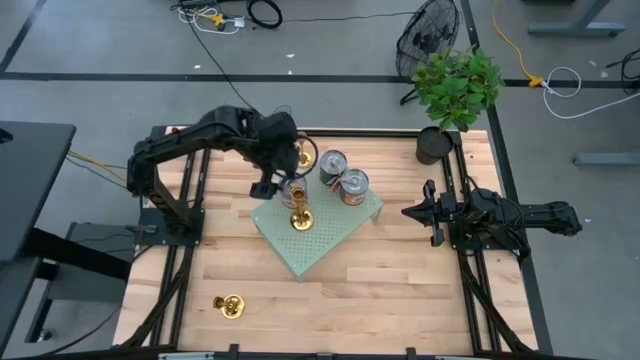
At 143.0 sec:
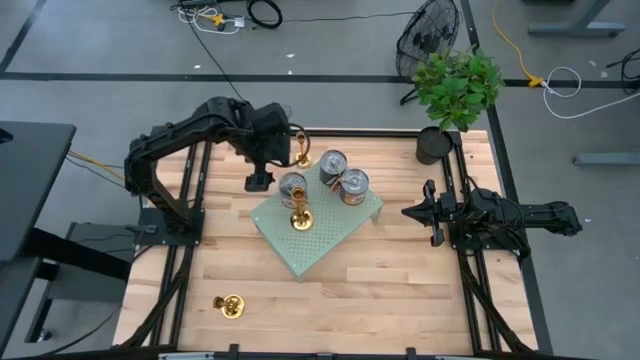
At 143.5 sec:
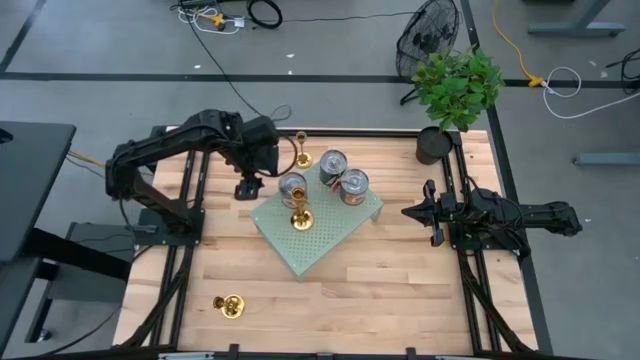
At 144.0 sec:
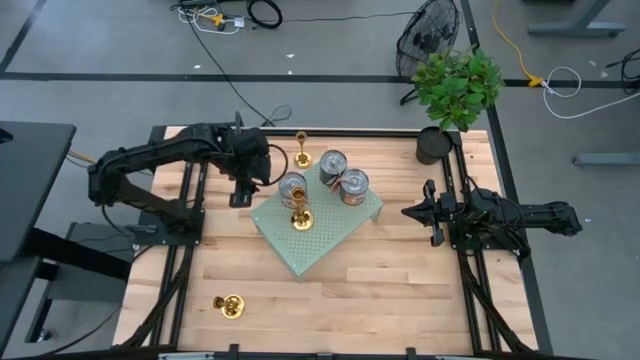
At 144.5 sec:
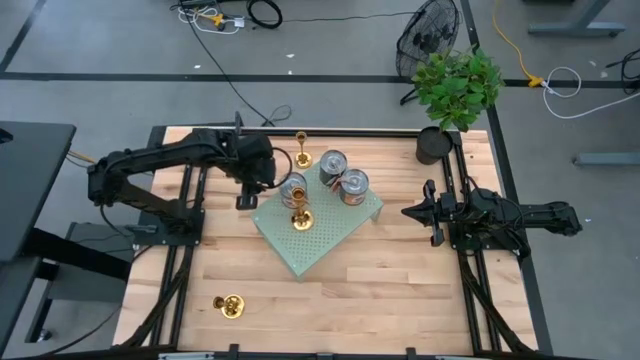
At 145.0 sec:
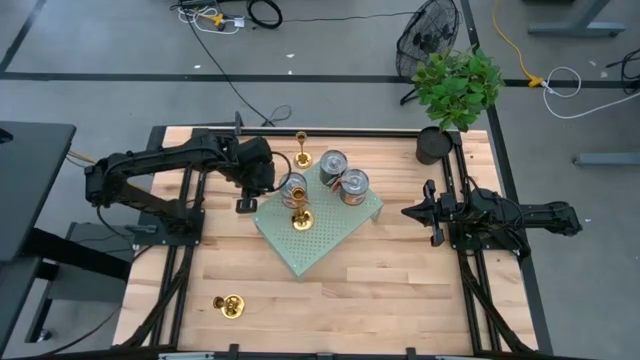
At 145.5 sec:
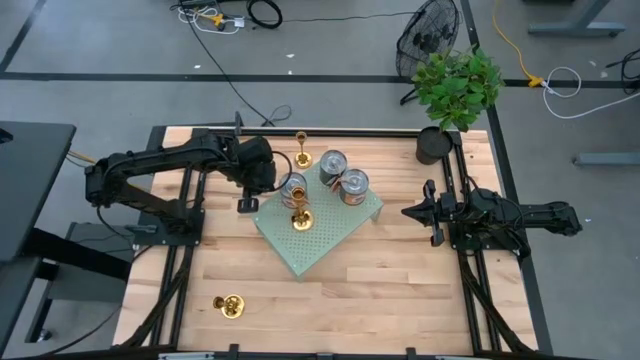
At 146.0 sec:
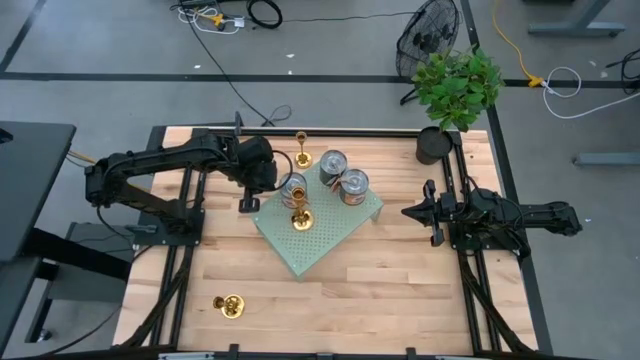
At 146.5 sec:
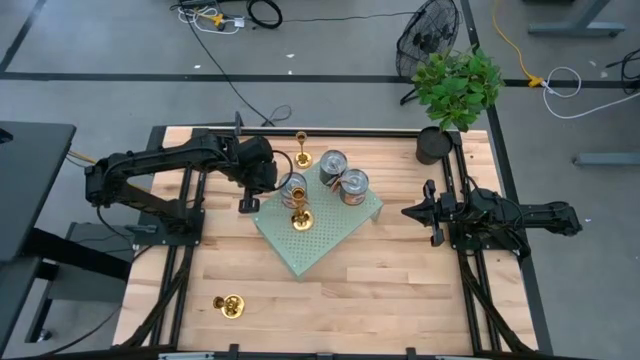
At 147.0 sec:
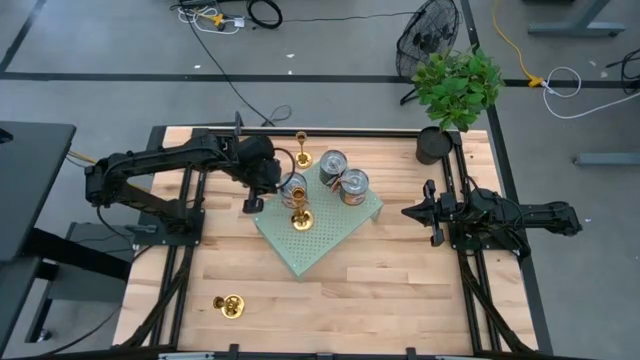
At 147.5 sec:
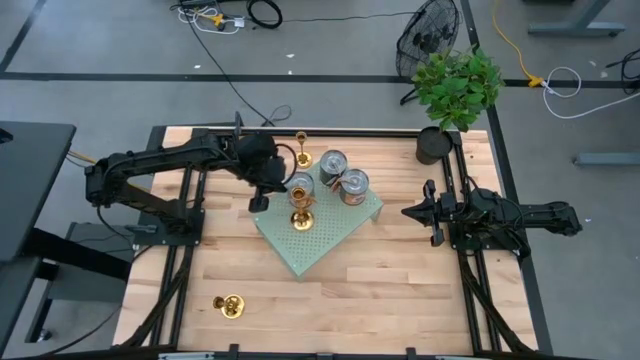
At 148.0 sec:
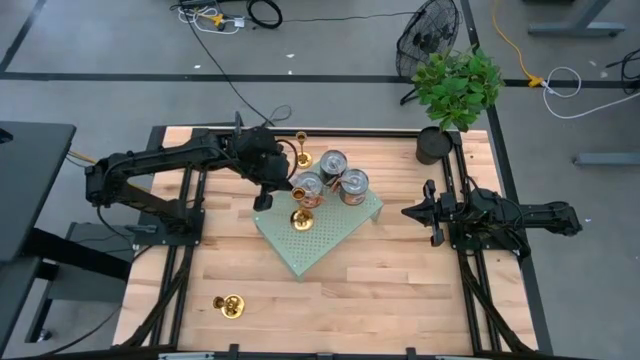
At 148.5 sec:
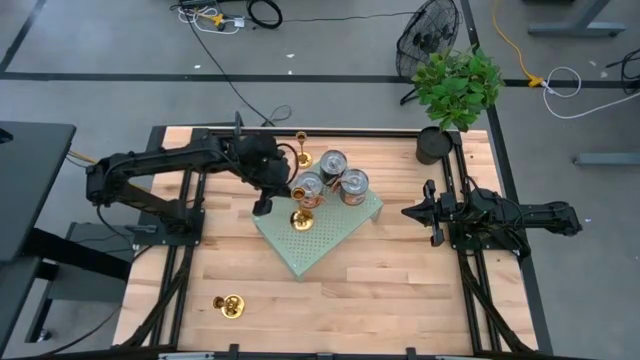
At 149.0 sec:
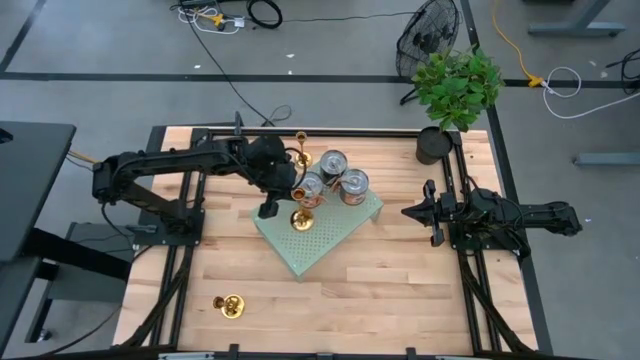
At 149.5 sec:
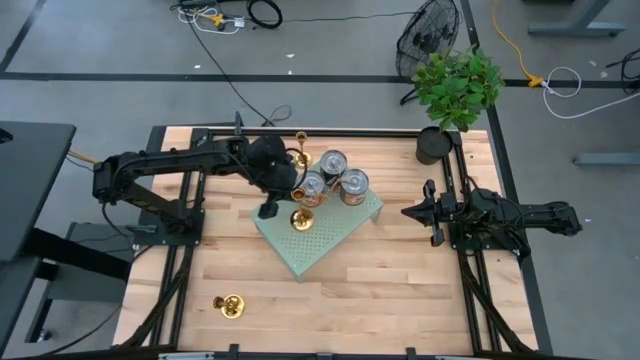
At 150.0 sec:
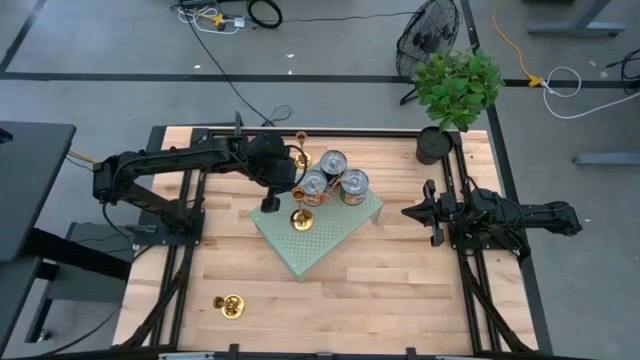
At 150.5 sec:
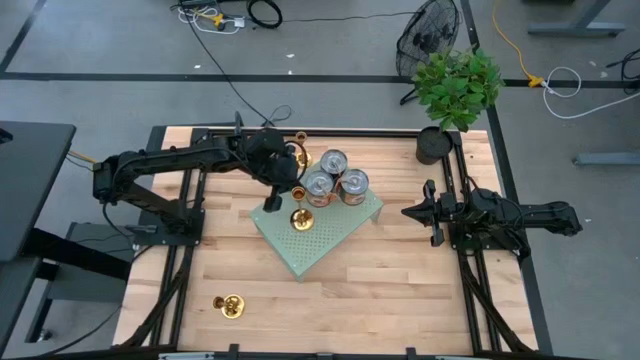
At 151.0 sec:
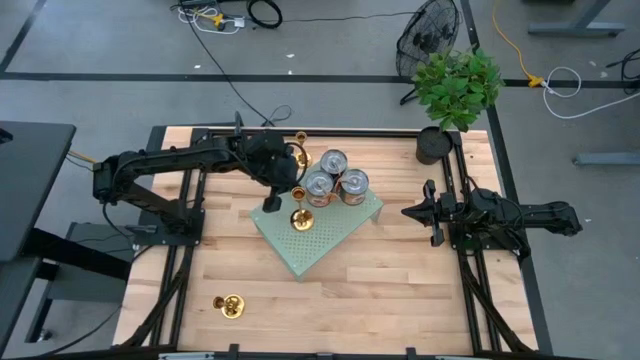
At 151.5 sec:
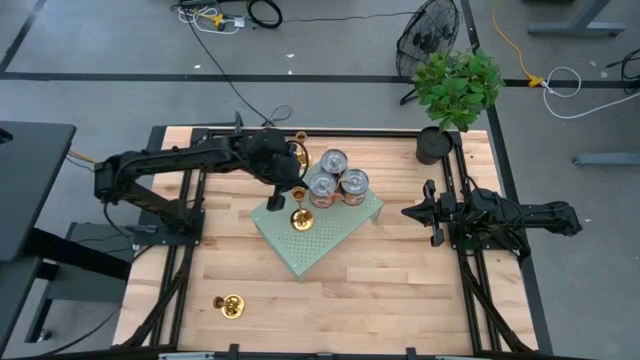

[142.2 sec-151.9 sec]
Task: Pick & Place candle stick holders
Adjust the silver candle can

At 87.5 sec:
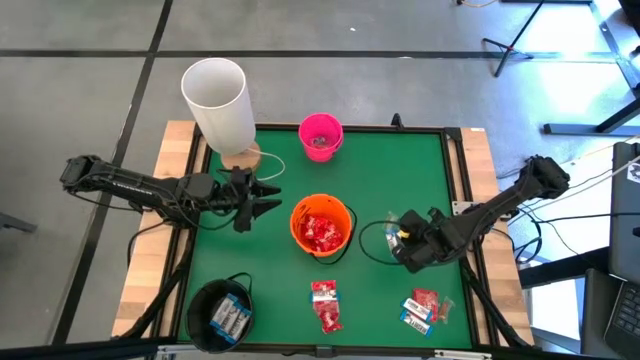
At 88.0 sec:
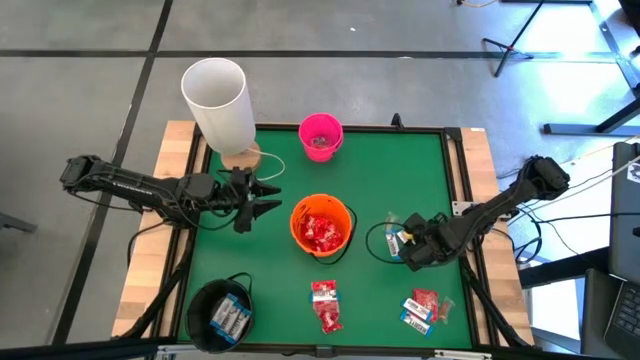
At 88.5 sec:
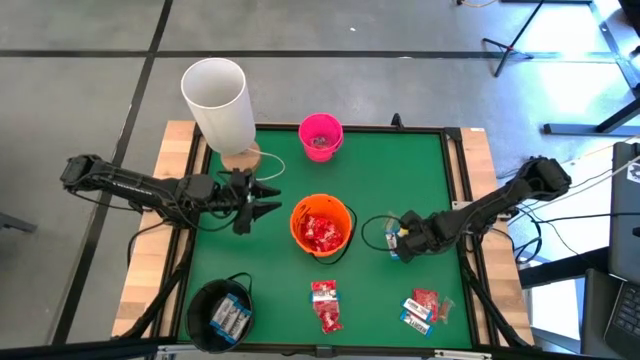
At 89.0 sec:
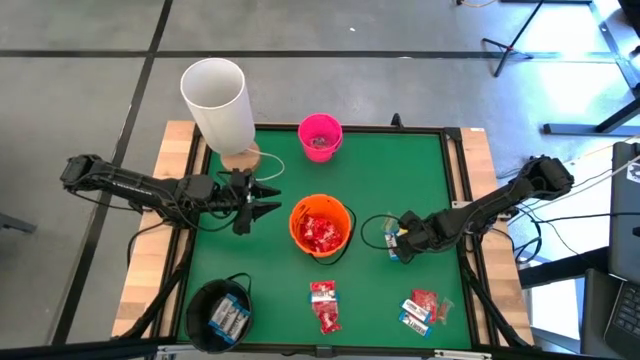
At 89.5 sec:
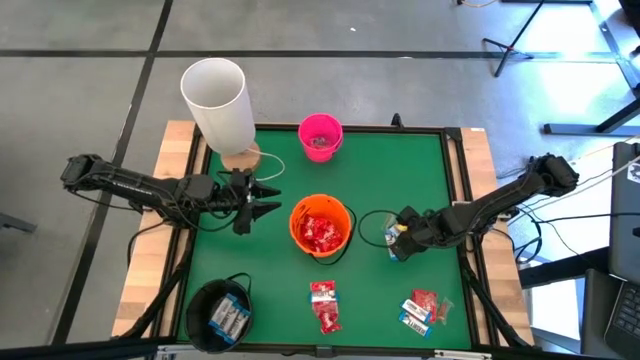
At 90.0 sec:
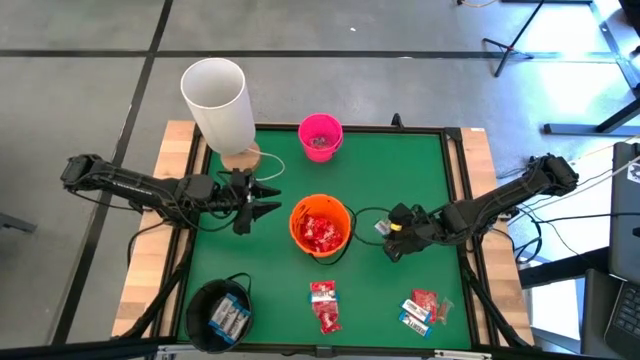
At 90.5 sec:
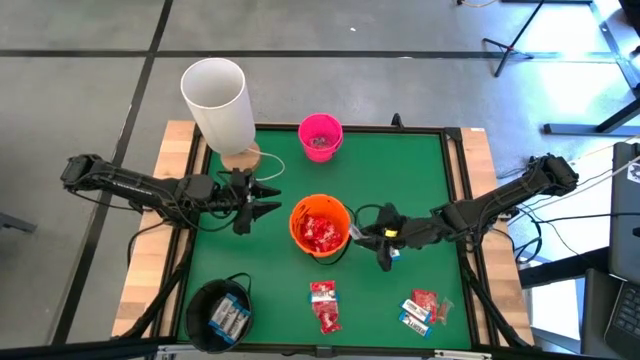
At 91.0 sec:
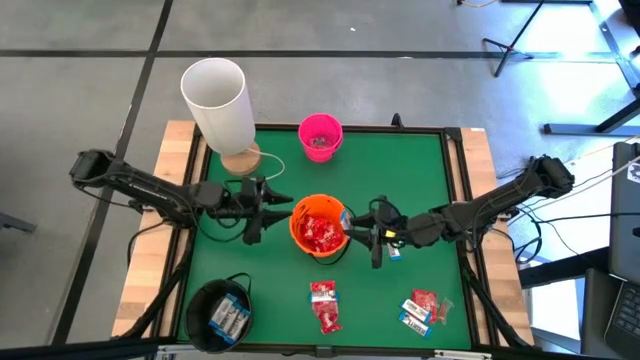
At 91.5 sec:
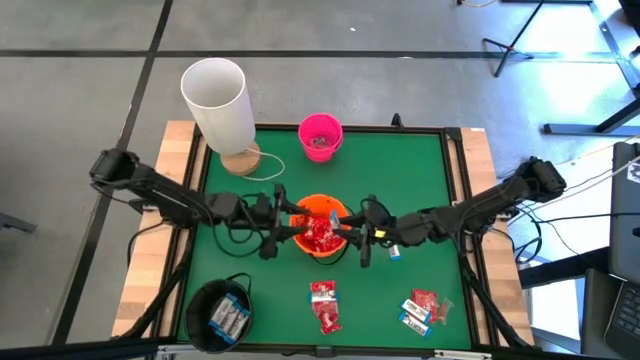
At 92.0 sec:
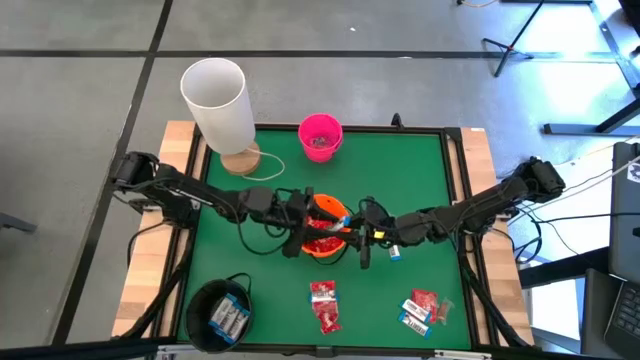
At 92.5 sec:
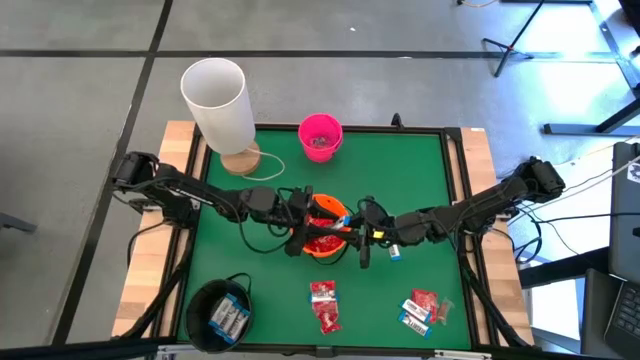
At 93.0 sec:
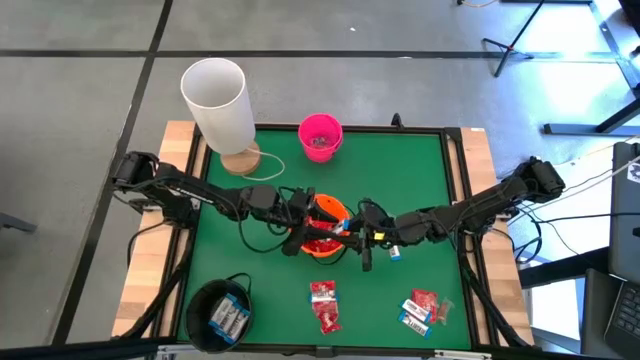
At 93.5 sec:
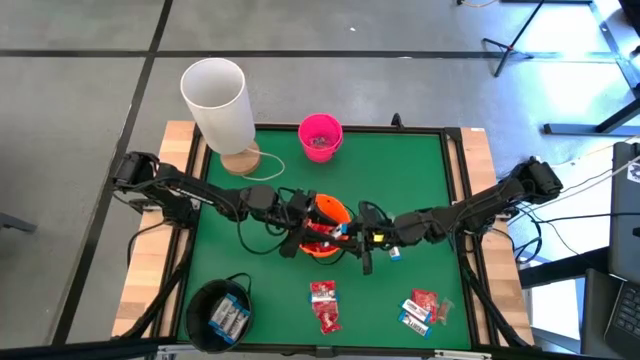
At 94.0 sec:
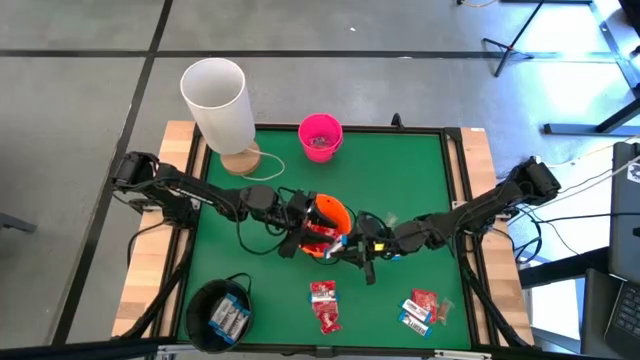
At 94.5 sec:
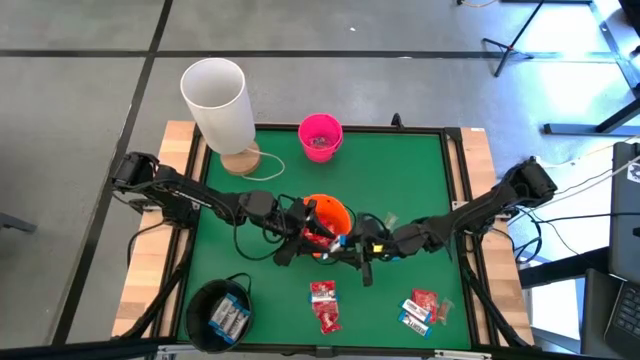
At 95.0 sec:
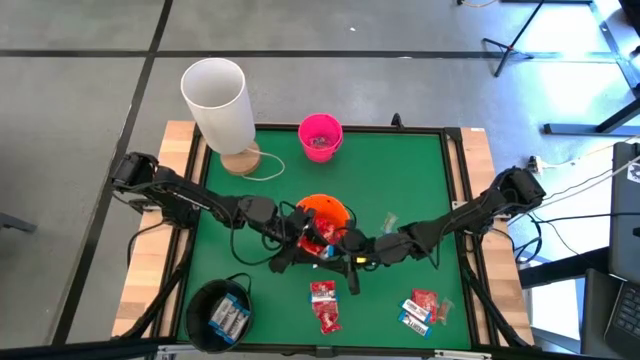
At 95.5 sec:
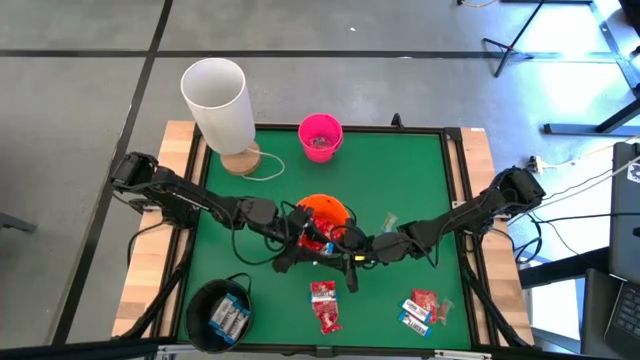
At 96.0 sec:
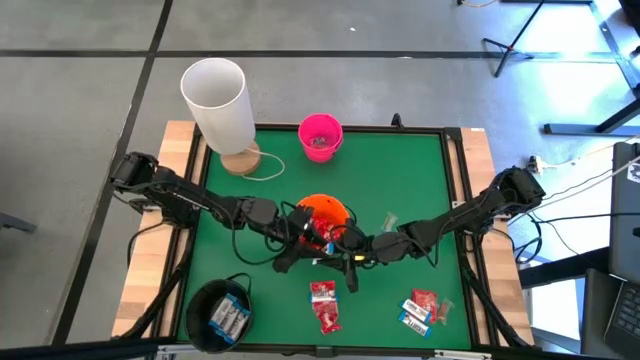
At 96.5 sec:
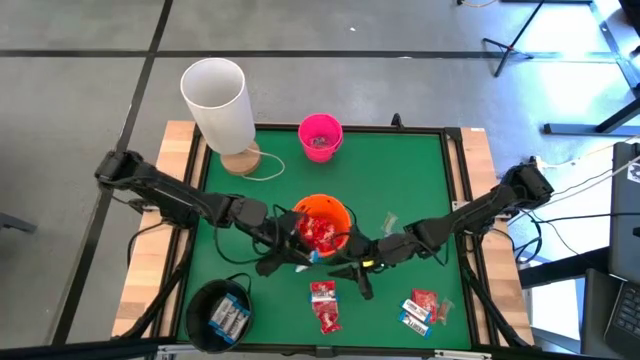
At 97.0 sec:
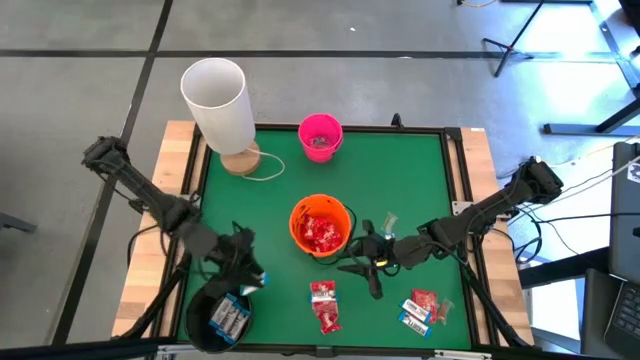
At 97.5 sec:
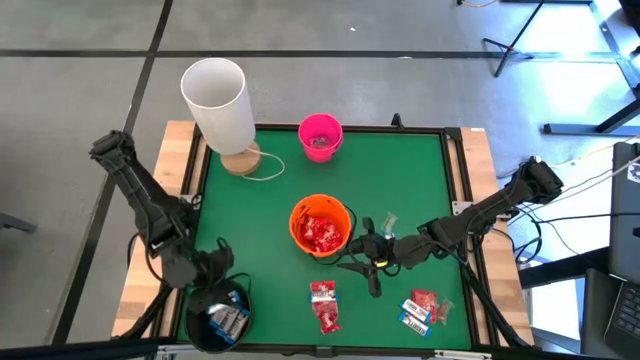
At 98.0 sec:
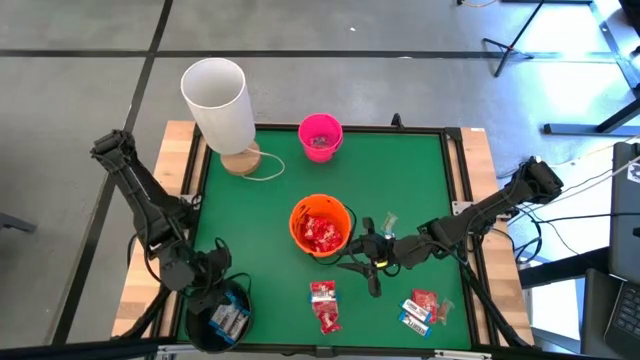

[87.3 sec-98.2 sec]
Task: Sort candy
Put the white chocolate into the black bucket
